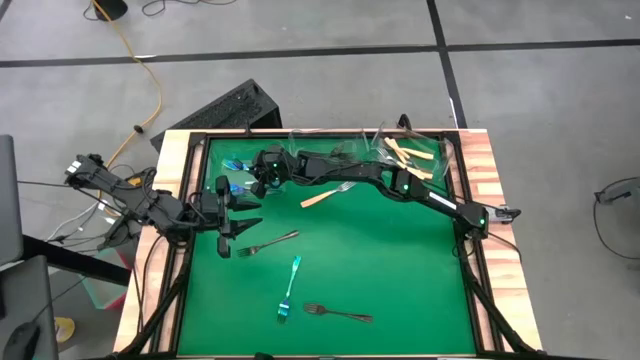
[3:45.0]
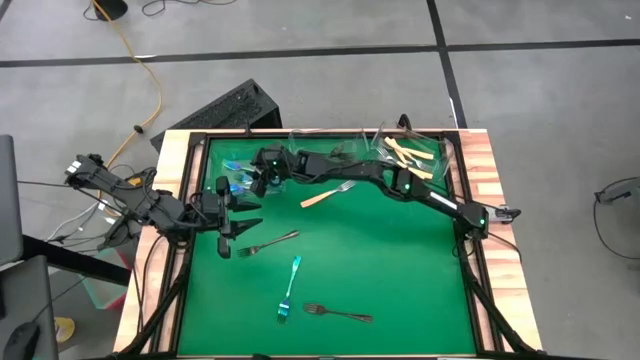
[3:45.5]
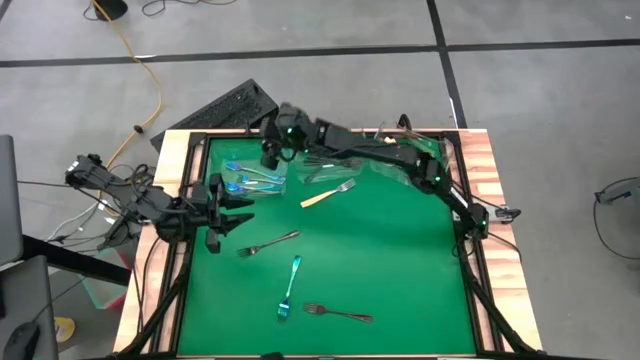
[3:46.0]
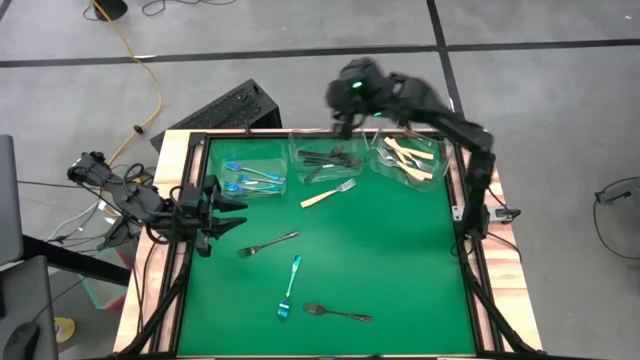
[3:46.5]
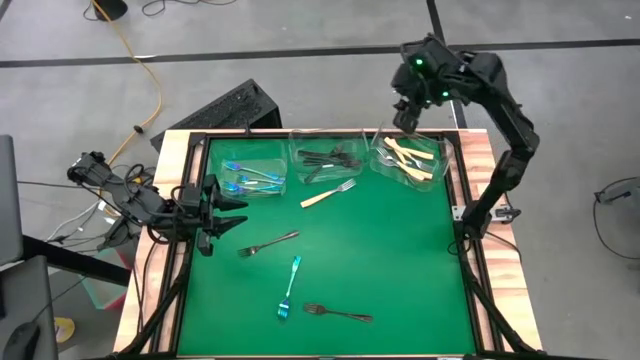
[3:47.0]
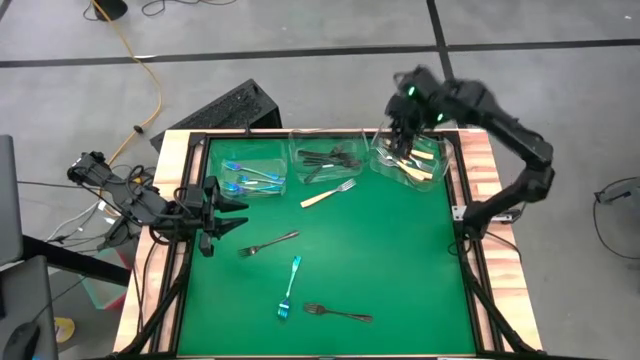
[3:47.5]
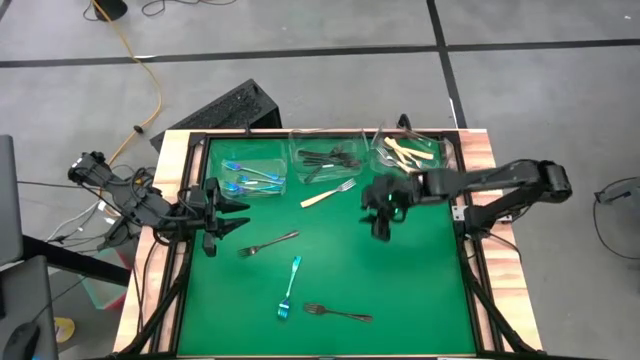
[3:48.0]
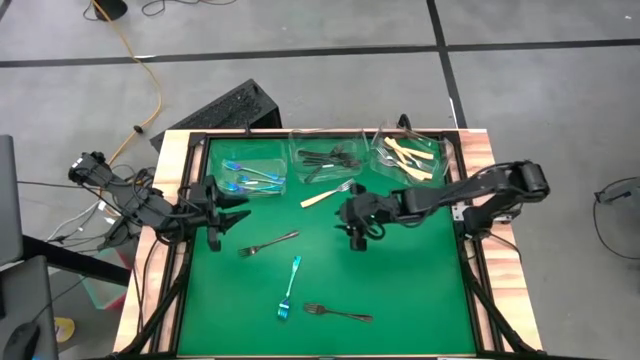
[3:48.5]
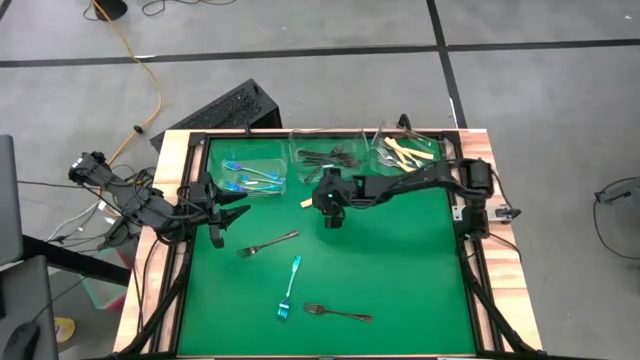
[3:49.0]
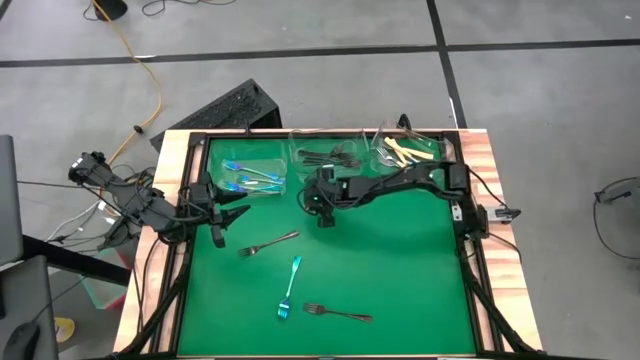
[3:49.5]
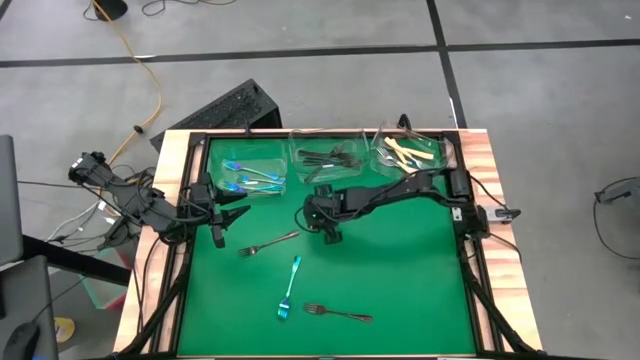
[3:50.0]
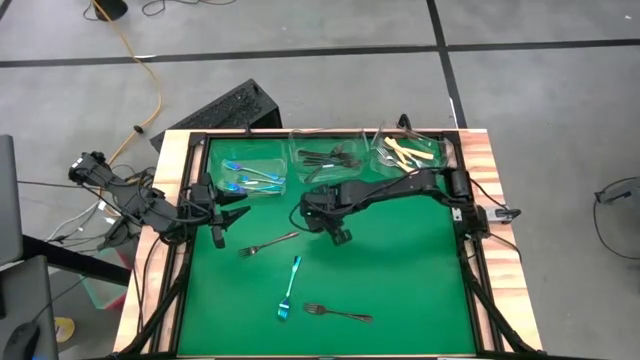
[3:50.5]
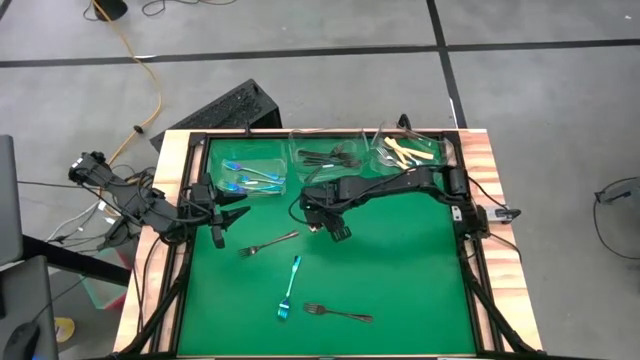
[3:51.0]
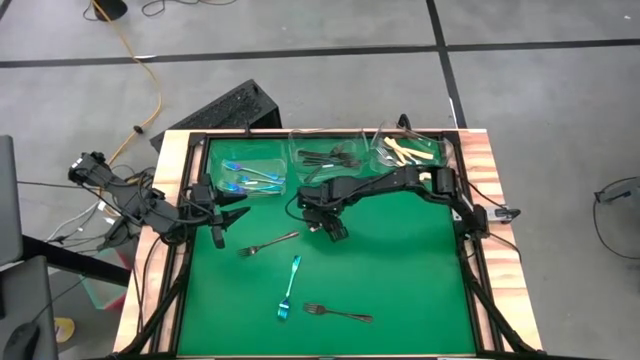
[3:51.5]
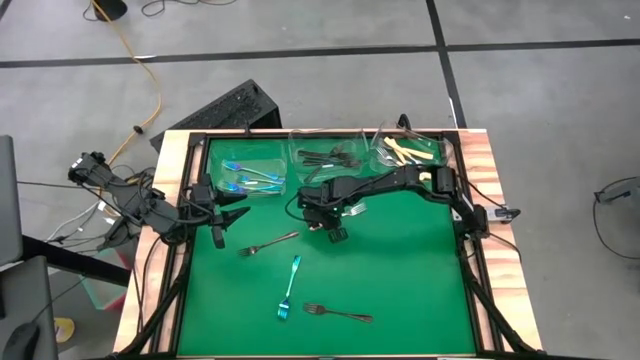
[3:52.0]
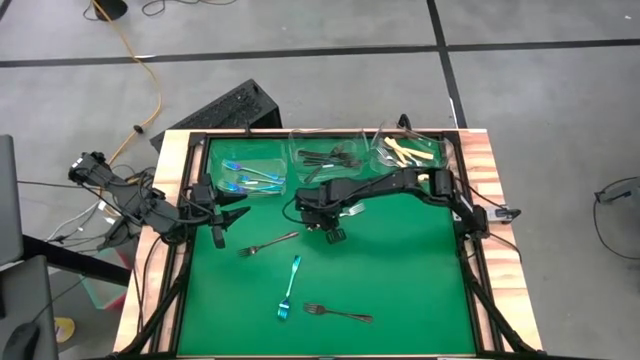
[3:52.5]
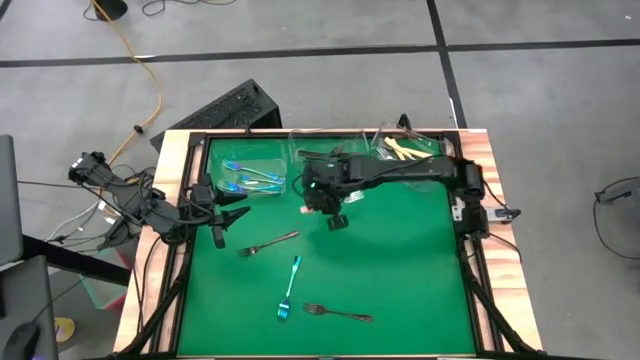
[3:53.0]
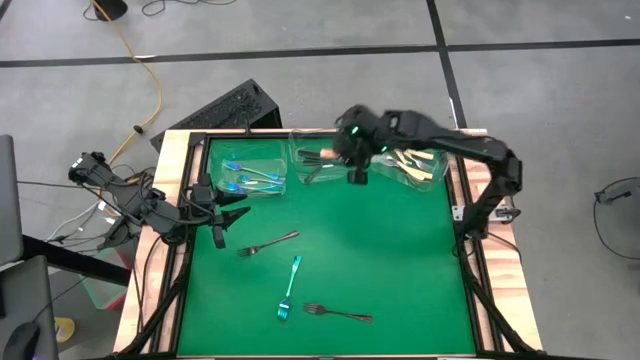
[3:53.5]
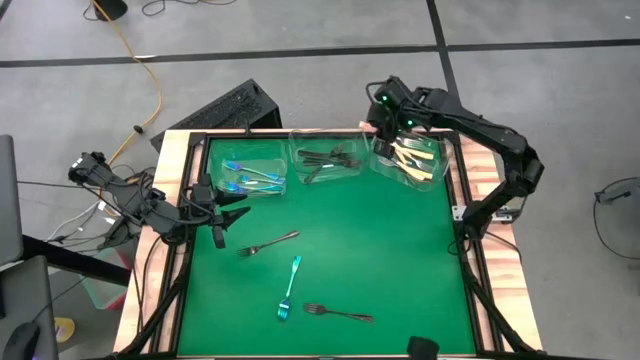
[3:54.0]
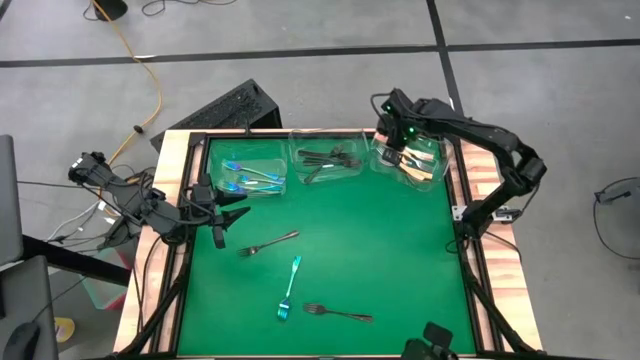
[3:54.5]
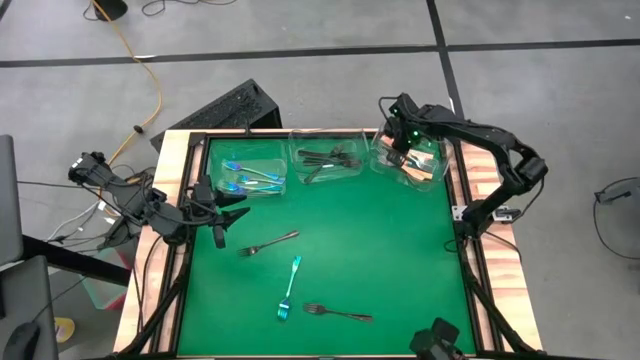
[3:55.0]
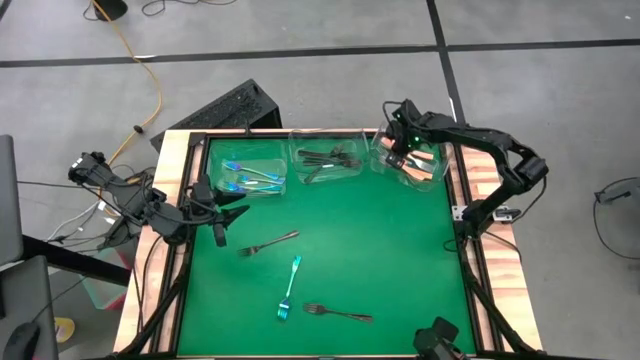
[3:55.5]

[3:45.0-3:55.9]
Task: Sort silverware by color (type)
Put the yellow fork into the right transparent bin

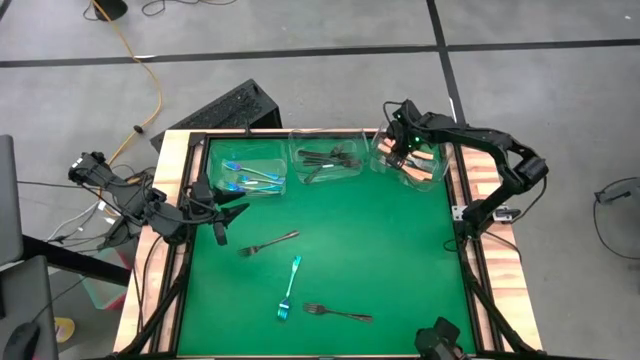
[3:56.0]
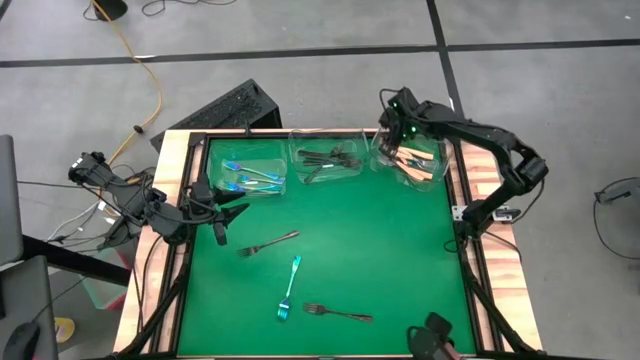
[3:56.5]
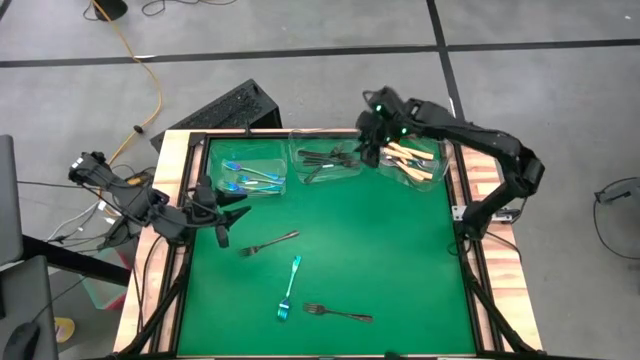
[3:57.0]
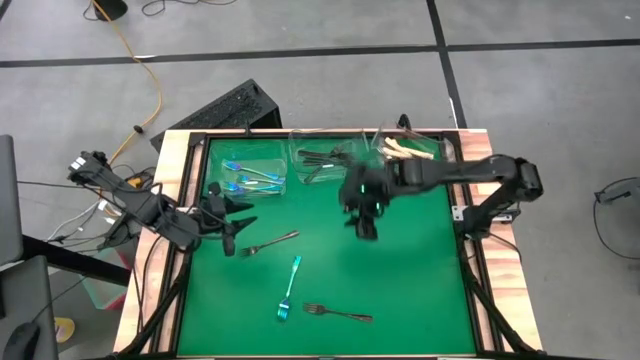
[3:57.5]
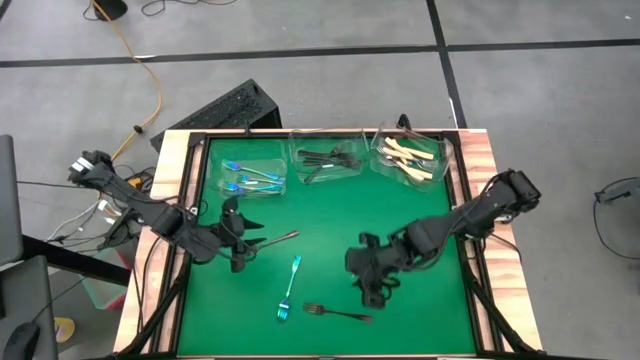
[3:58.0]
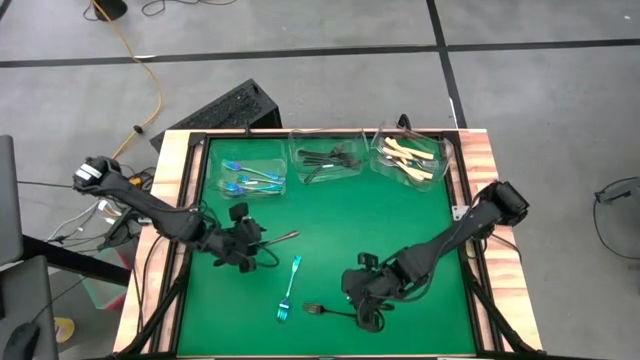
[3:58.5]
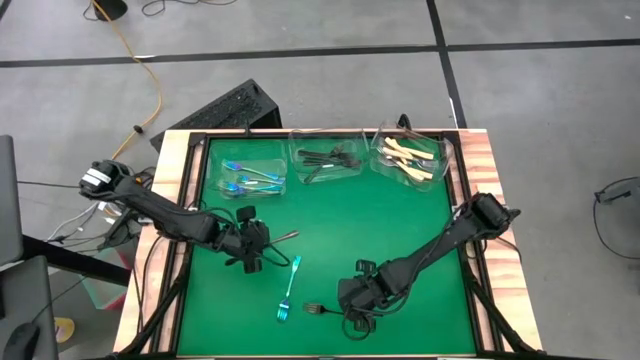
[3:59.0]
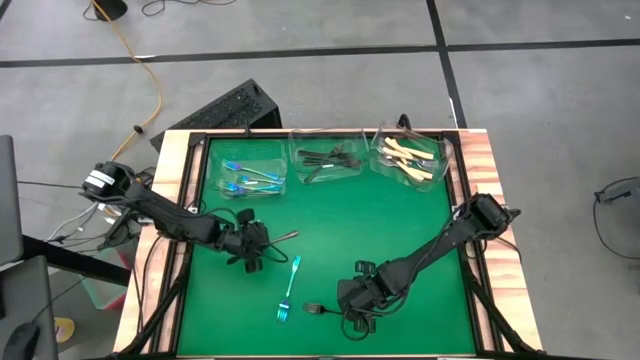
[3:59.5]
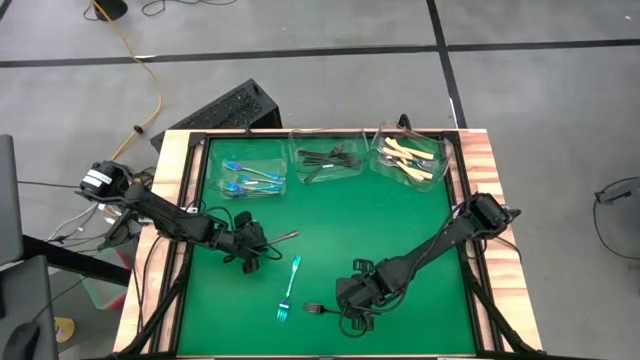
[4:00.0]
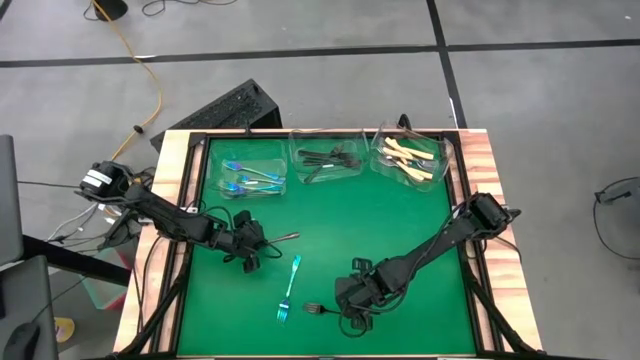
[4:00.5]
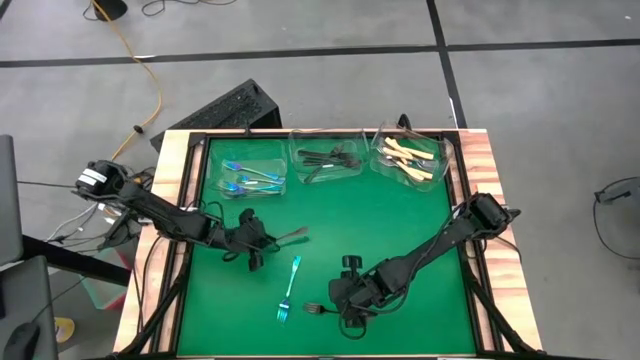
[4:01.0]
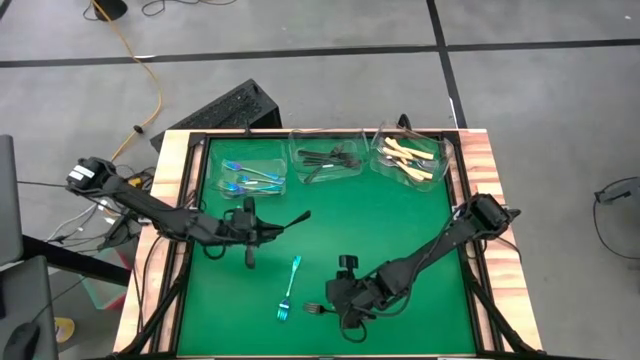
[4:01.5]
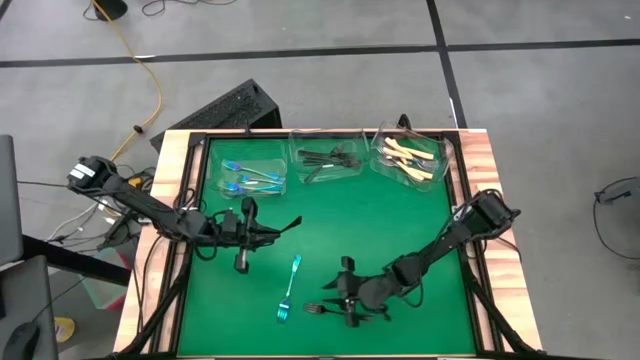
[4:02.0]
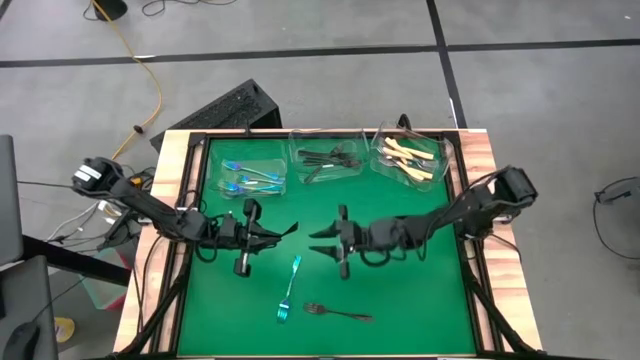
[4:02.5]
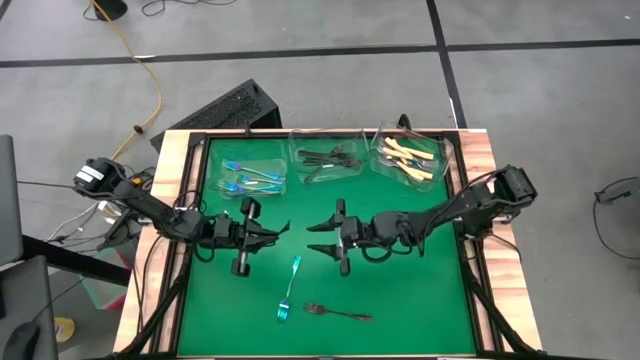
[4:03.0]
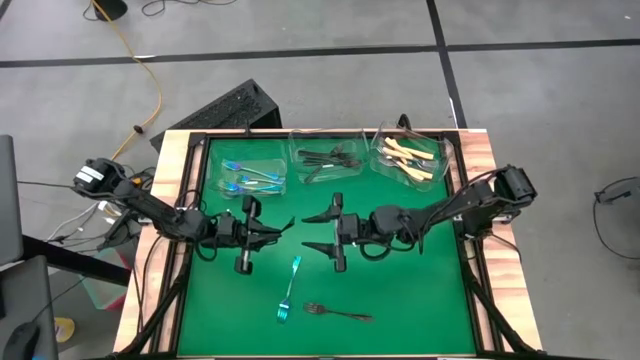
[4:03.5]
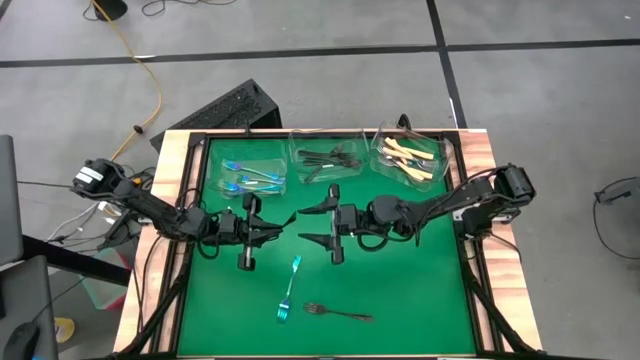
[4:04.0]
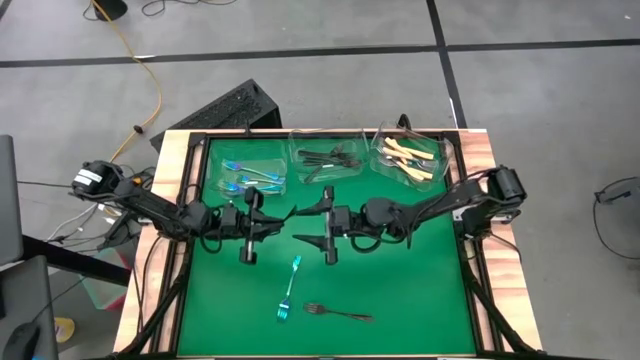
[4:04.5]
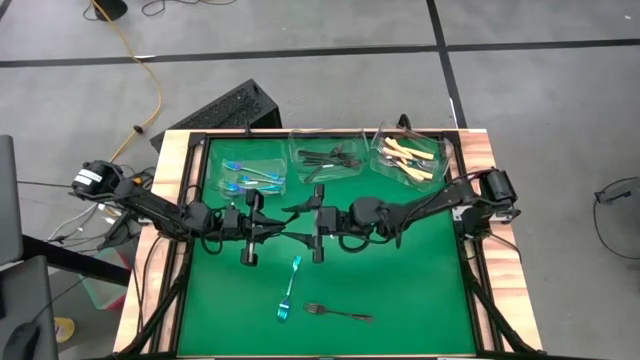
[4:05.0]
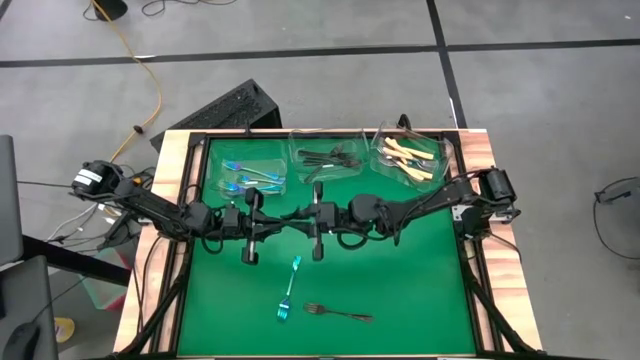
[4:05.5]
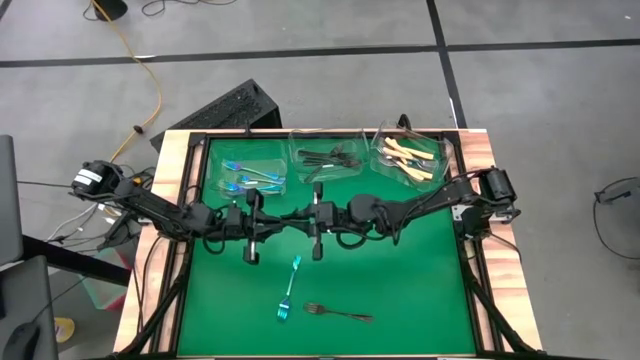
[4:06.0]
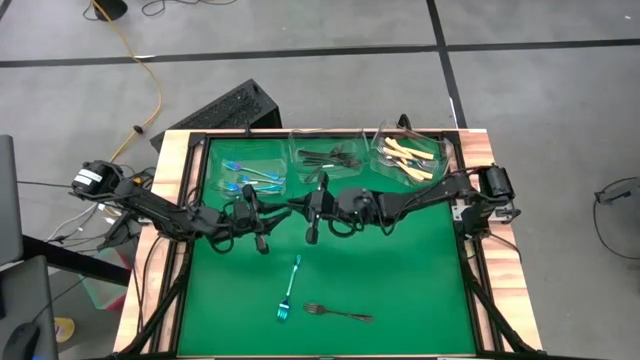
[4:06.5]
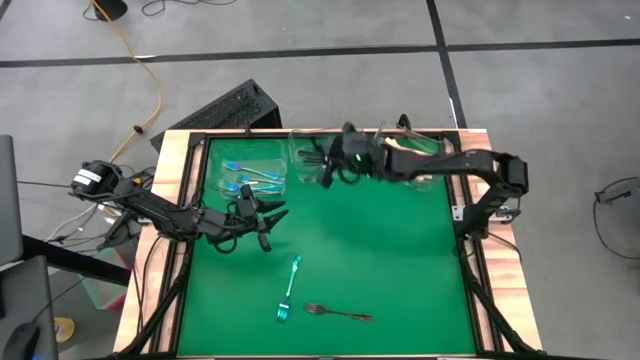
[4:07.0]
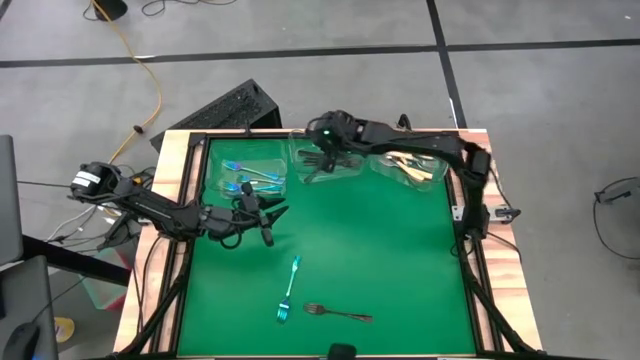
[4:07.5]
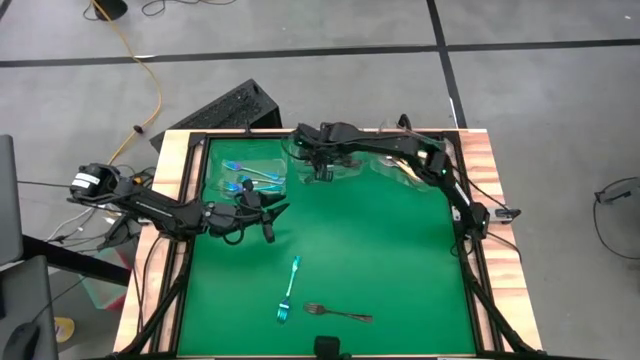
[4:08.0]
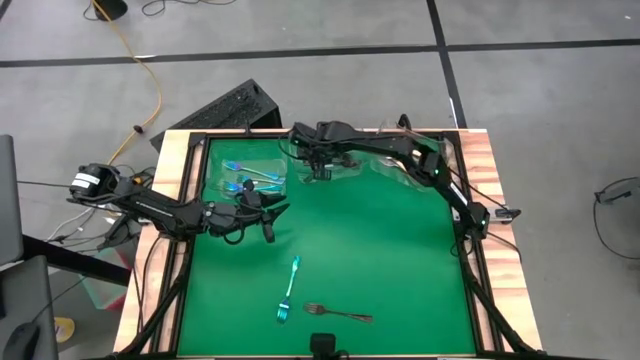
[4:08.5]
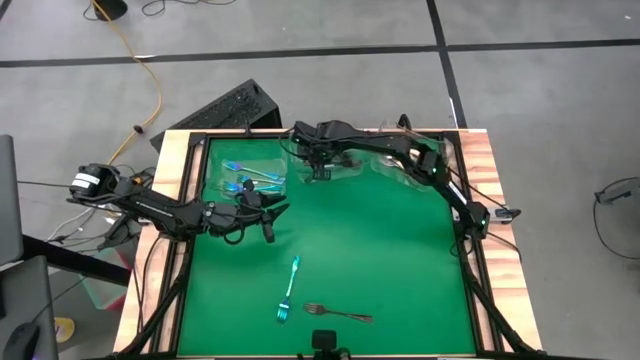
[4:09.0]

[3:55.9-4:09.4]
Put the brown fork into the middle transparent bin
